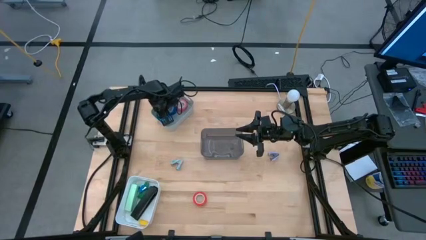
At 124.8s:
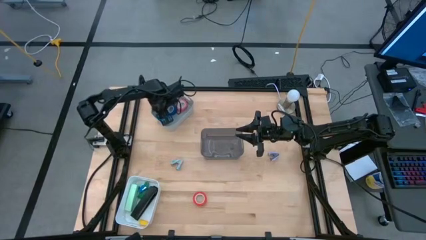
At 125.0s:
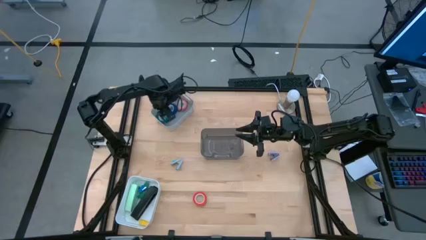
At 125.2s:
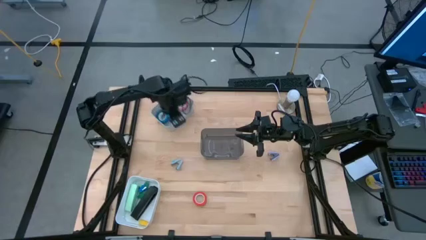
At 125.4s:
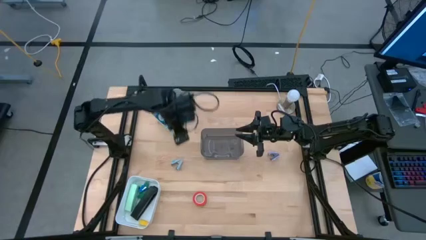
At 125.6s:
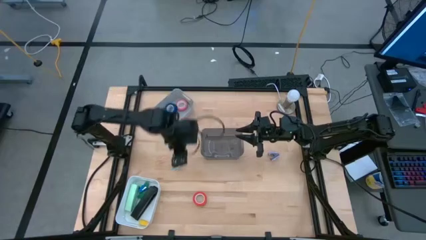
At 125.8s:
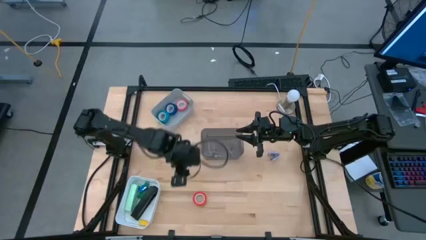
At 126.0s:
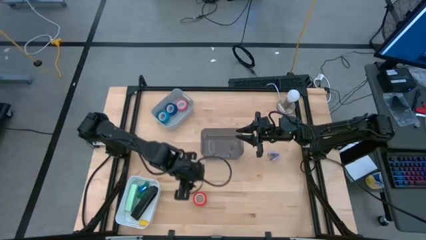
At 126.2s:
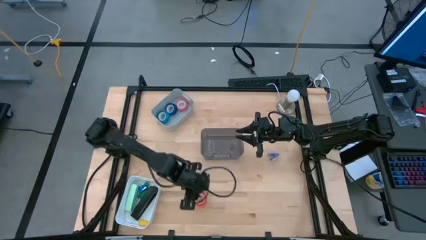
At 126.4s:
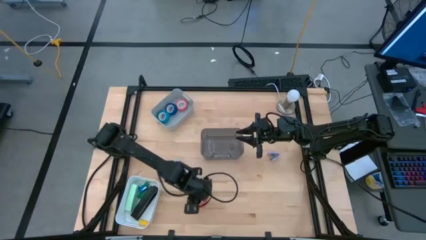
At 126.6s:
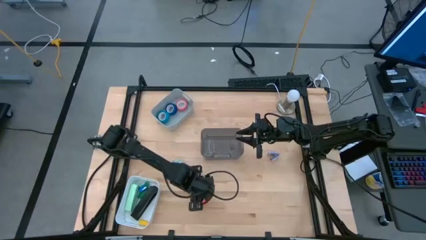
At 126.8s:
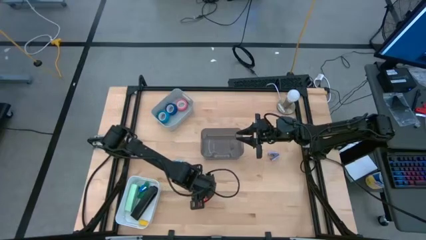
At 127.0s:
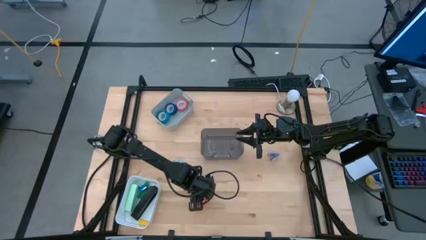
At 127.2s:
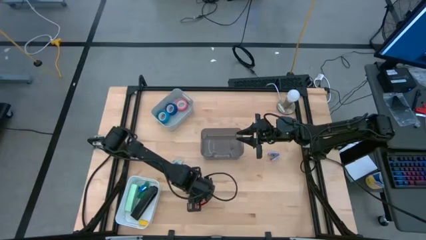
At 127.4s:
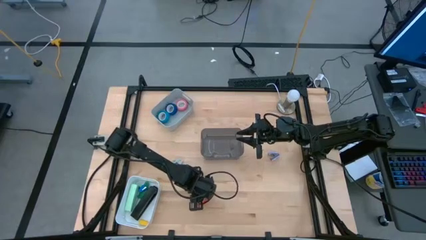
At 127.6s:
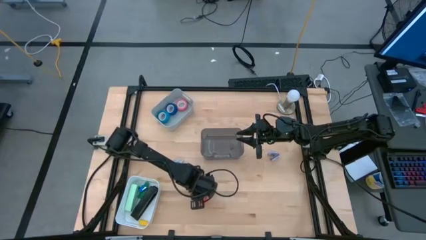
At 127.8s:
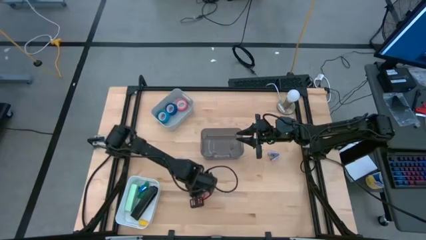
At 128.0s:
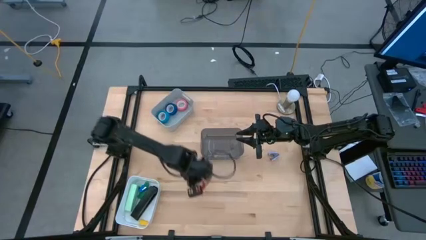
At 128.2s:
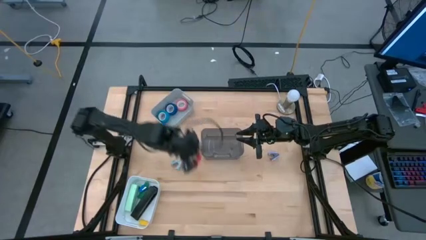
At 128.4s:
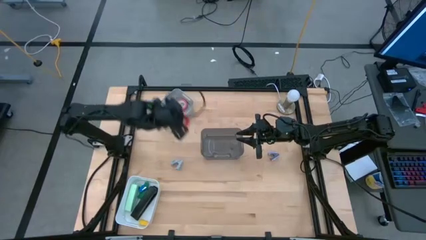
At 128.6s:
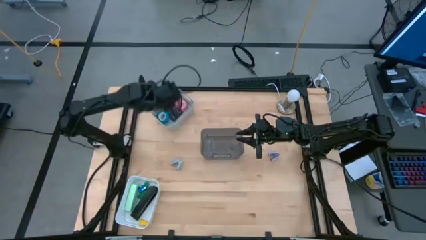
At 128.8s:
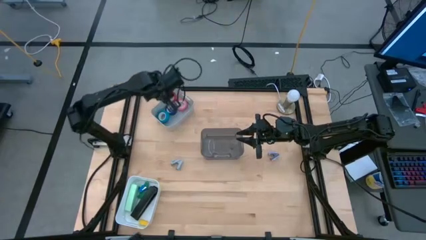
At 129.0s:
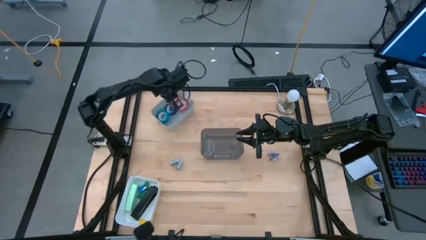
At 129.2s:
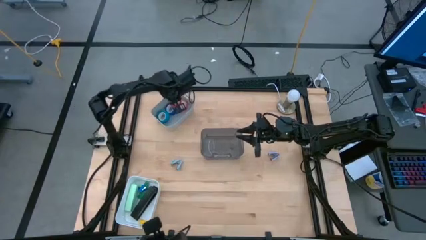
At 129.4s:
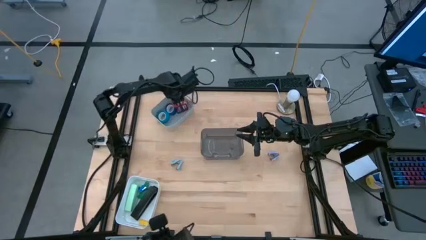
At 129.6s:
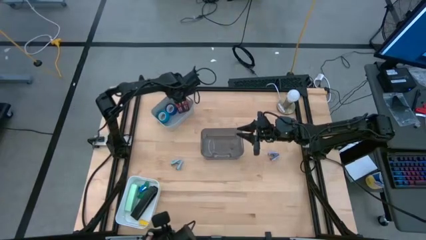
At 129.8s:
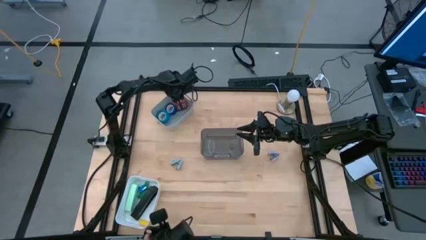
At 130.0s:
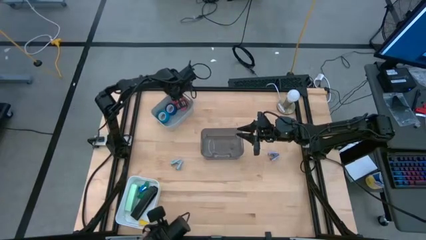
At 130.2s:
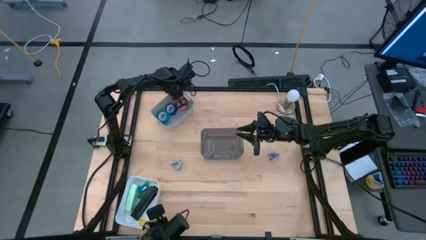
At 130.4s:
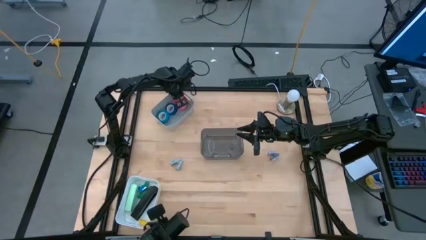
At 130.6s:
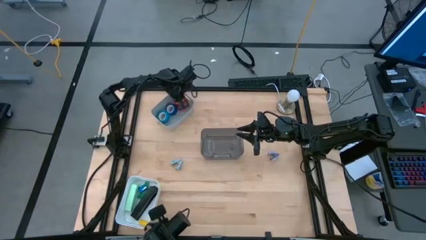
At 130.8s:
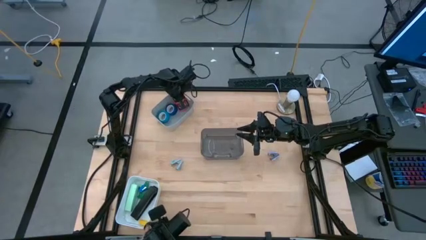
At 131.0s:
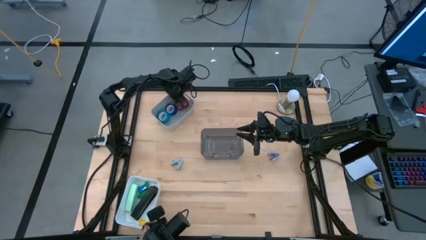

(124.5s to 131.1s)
Task: Pick and place Stapler, Stapler remover, tape
Put the orange tape into the grey bin

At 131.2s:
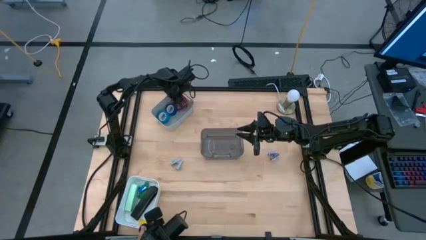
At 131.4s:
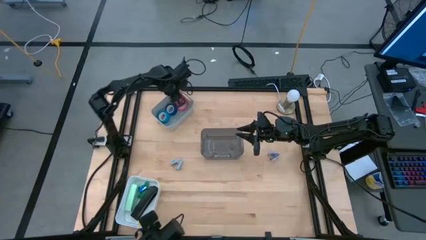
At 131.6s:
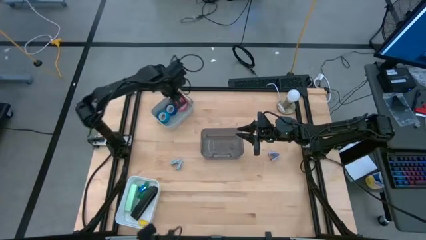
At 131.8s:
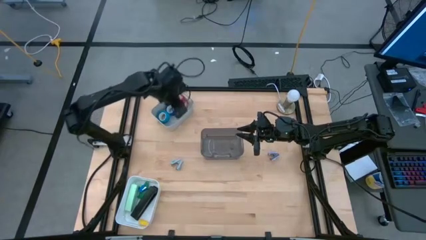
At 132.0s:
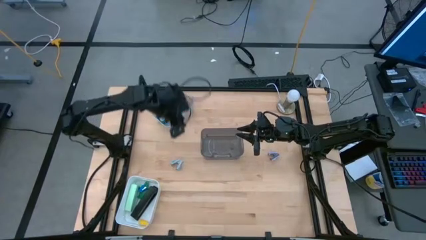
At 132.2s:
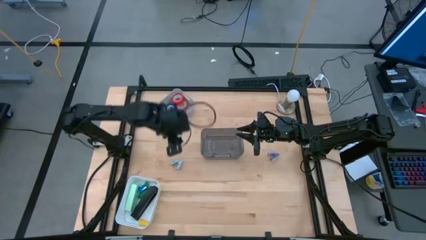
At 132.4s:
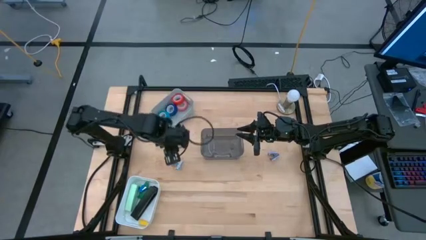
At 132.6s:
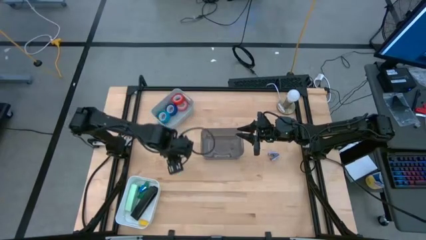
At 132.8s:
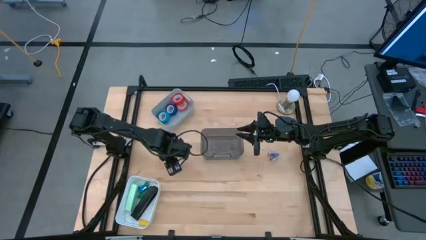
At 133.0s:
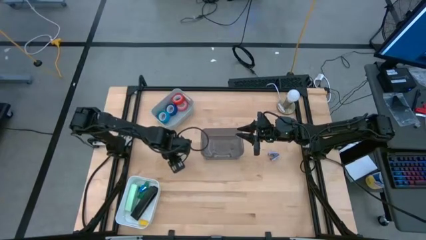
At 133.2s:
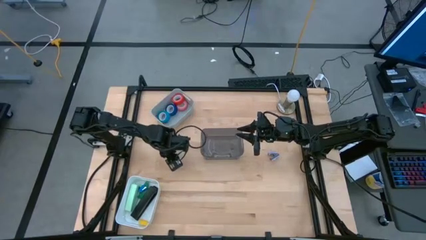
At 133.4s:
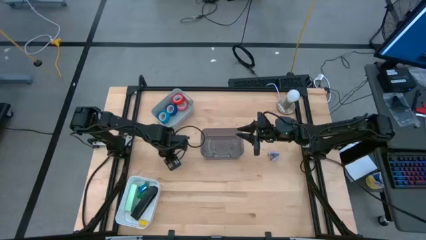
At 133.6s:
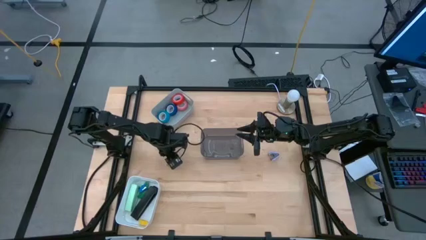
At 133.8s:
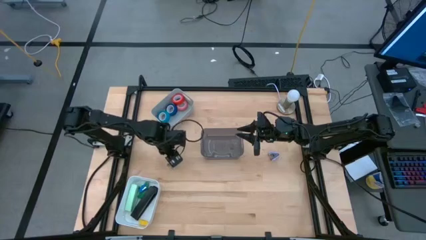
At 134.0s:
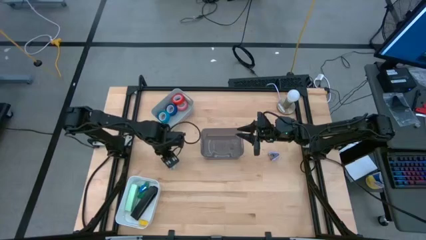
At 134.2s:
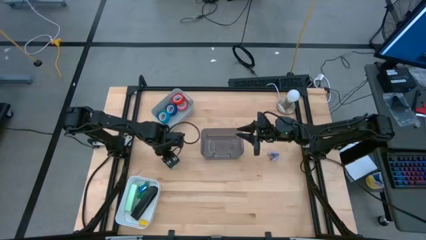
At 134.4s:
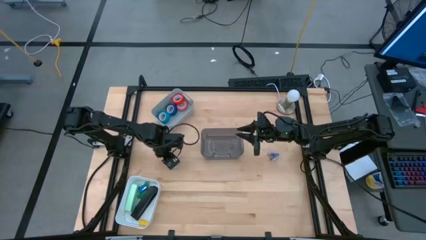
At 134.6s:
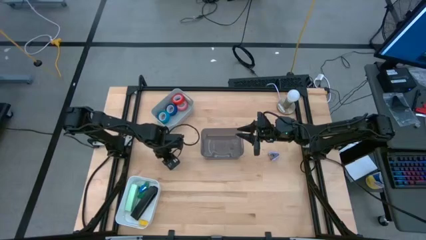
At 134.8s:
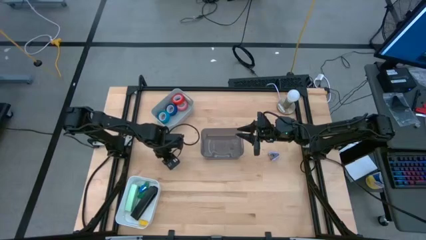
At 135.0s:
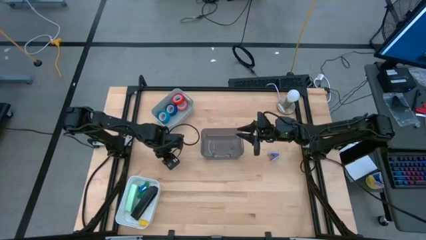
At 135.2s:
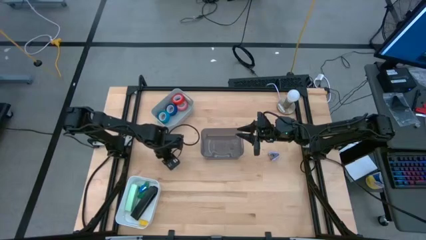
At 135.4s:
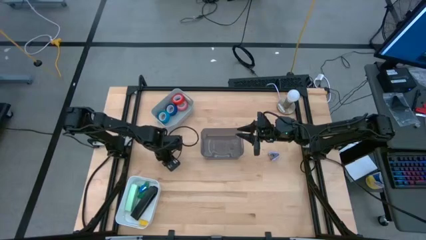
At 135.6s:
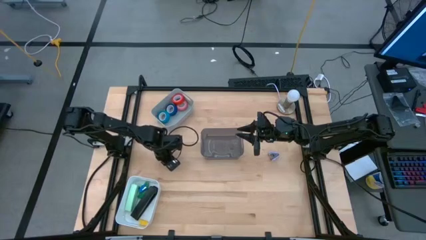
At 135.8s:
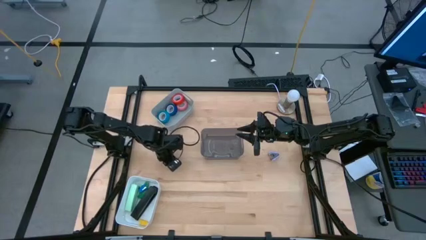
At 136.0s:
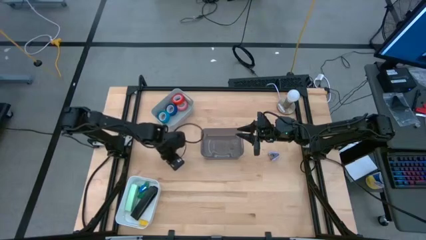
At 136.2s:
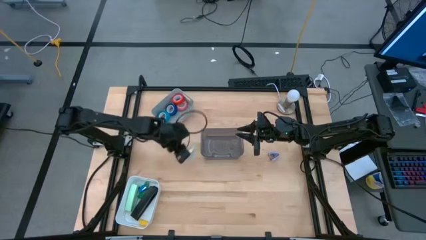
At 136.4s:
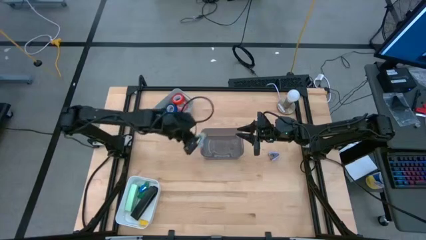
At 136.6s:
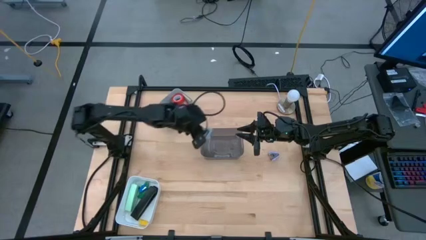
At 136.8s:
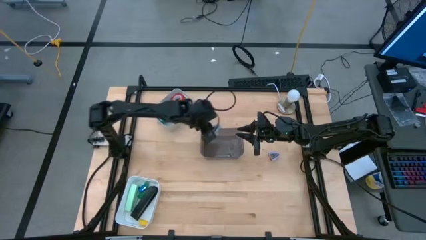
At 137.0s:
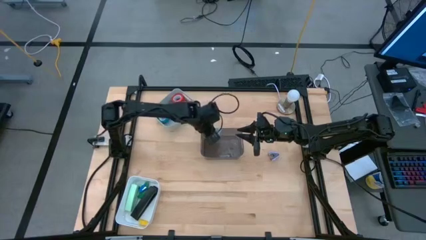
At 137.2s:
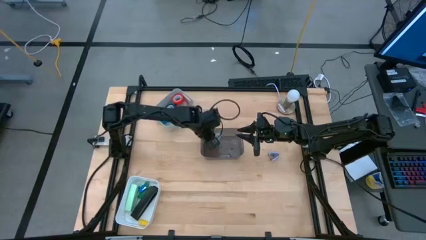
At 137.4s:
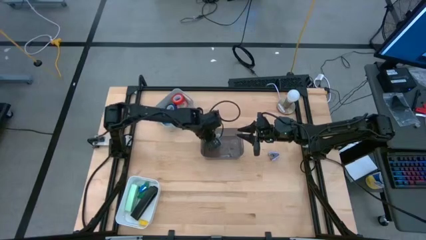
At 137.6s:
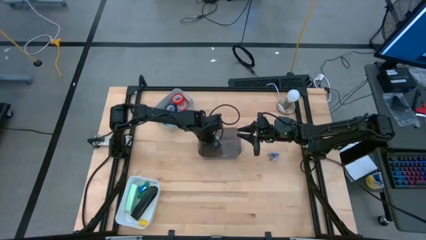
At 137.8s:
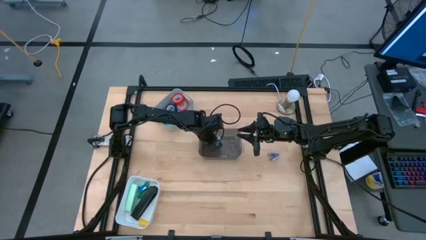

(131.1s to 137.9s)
Put the light blue staple remover into the black bin

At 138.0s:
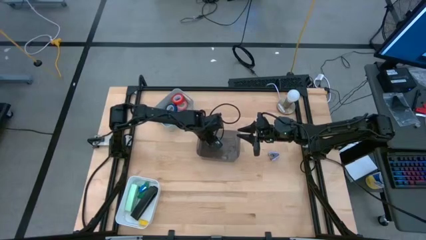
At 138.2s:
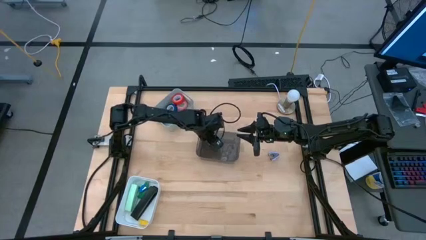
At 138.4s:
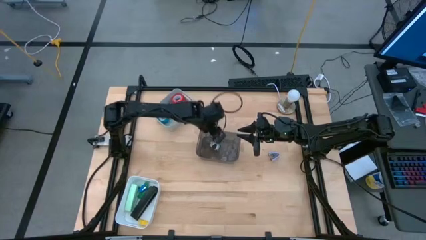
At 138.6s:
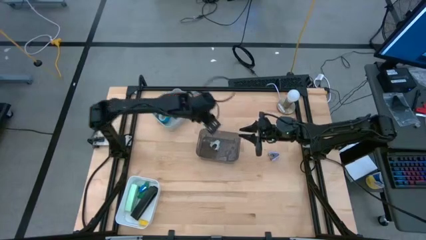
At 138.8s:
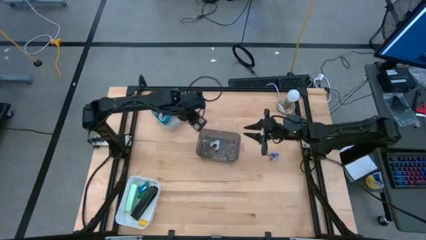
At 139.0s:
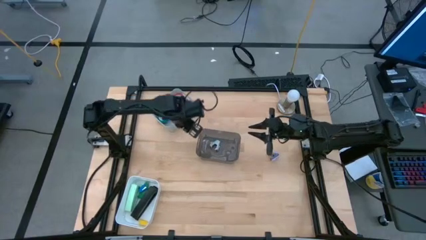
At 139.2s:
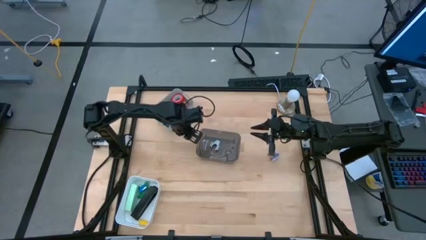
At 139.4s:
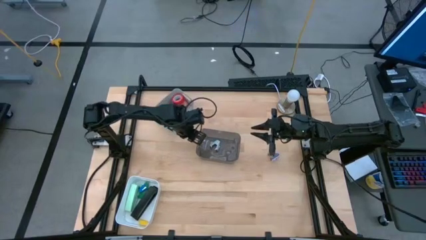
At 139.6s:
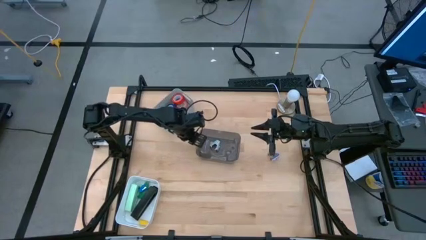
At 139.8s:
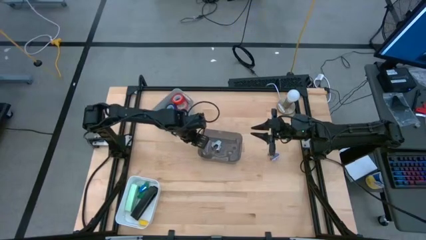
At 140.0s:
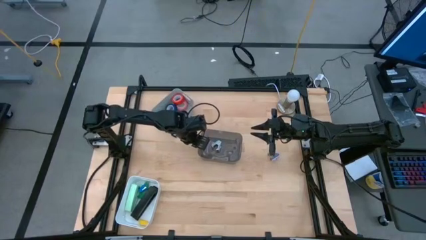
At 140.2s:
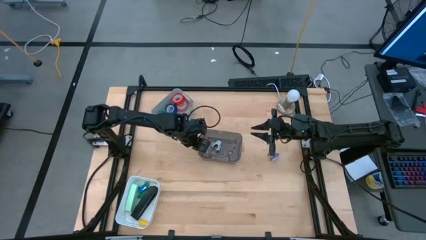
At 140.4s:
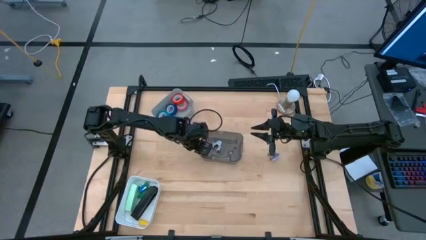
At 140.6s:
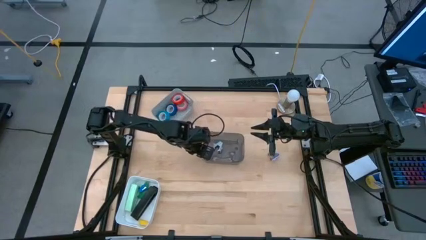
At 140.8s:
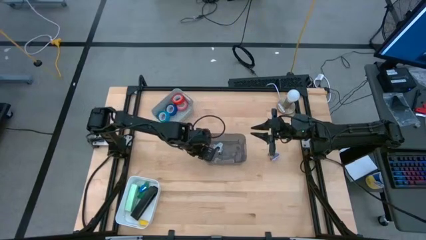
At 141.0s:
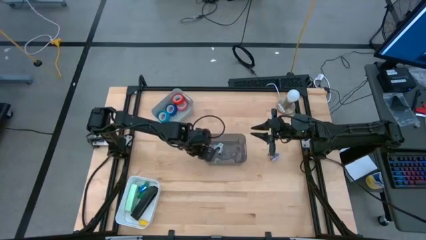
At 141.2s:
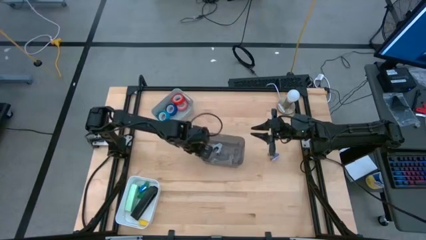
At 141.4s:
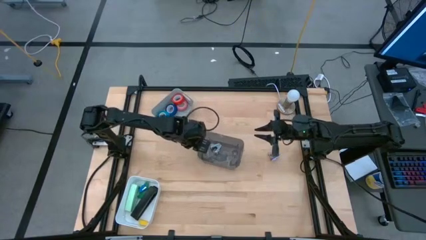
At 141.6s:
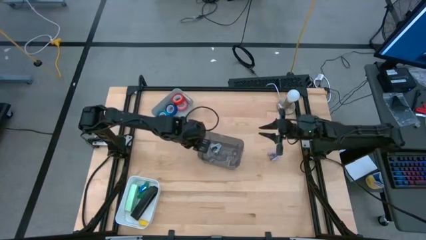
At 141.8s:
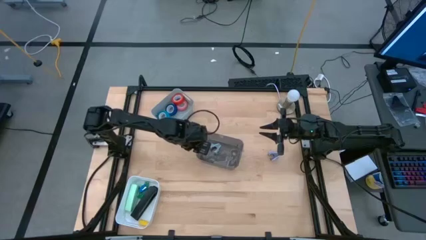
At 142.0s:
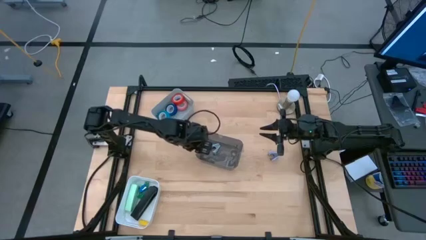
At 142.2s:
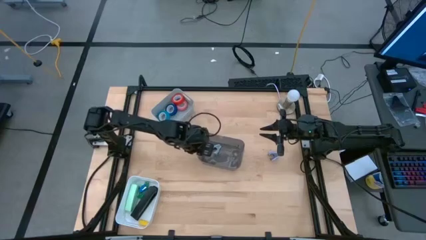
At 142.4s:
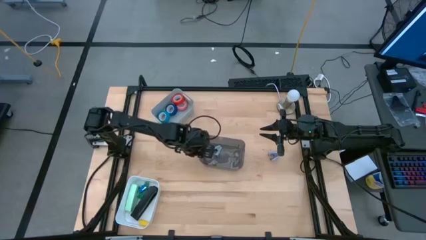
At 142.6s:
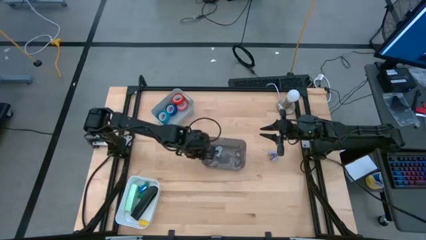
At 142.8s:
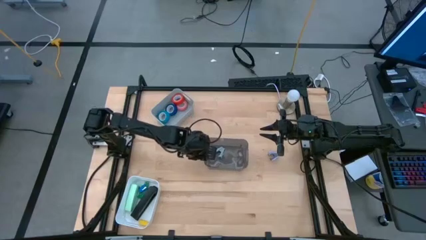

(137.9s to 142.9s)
Adjust the black bin on the table
